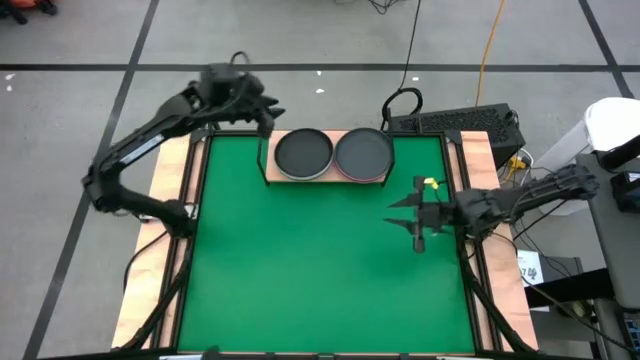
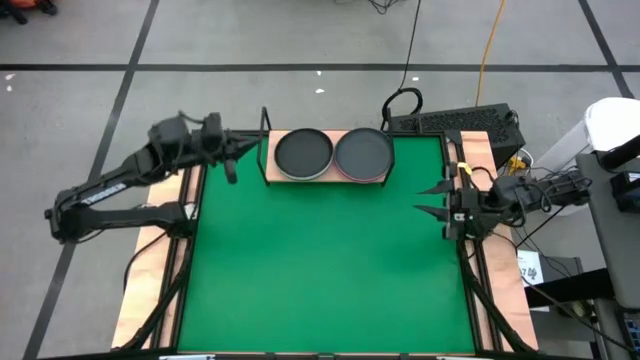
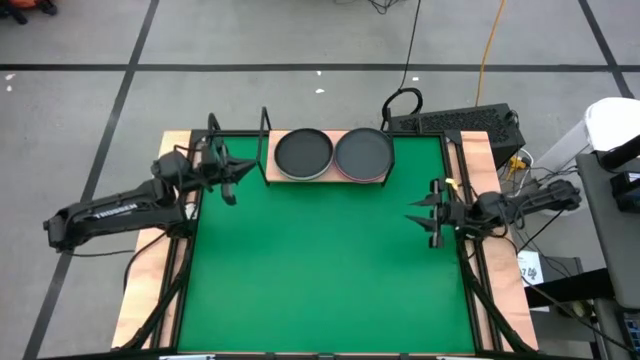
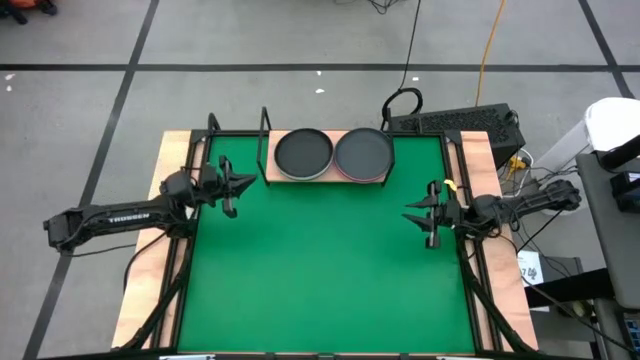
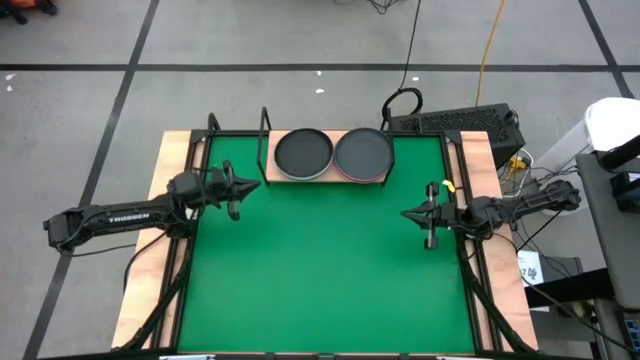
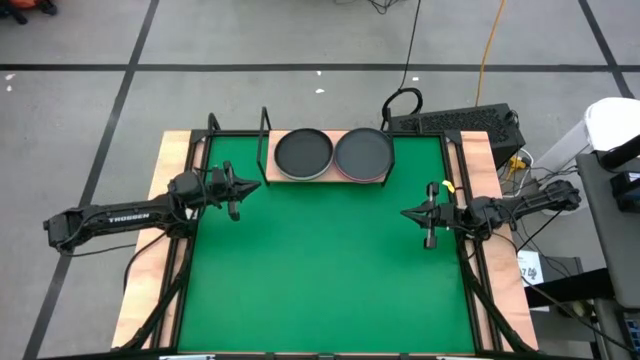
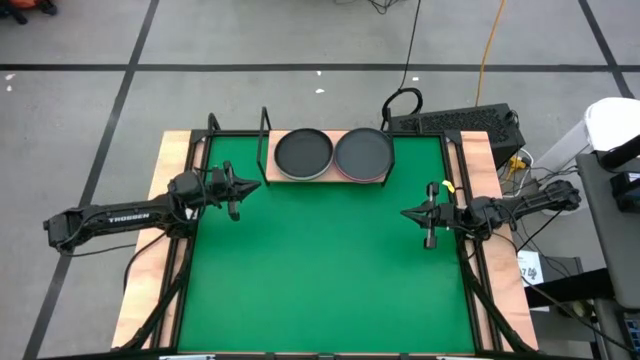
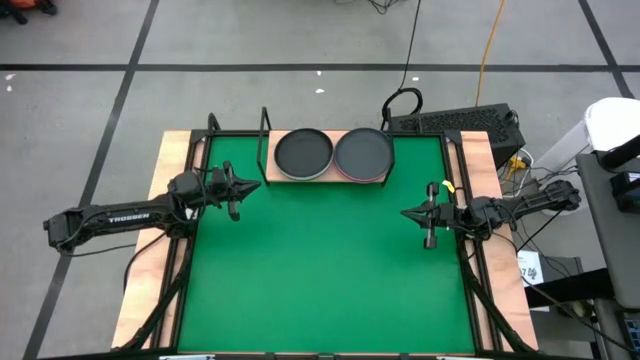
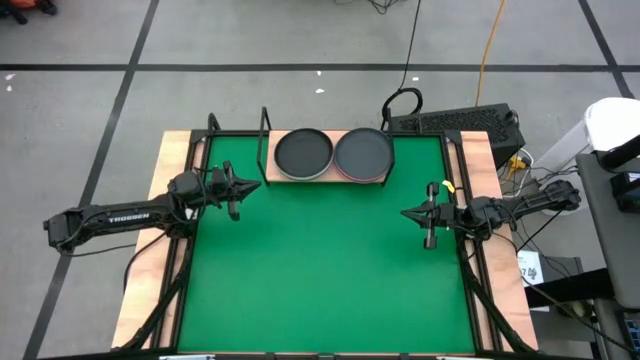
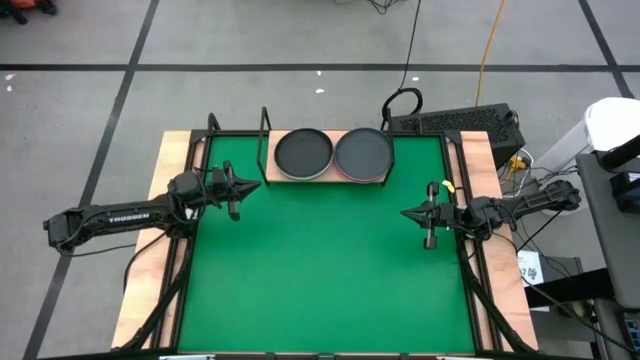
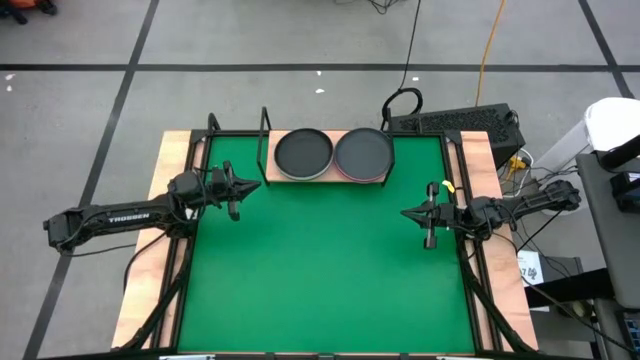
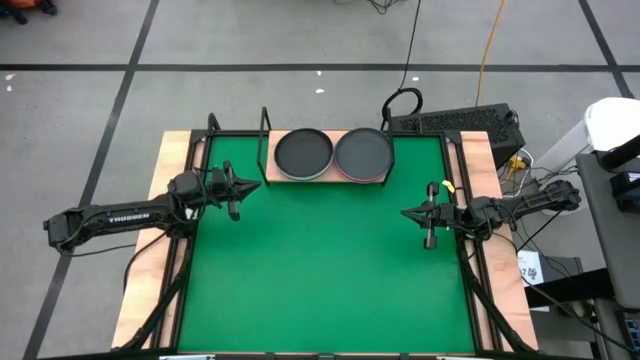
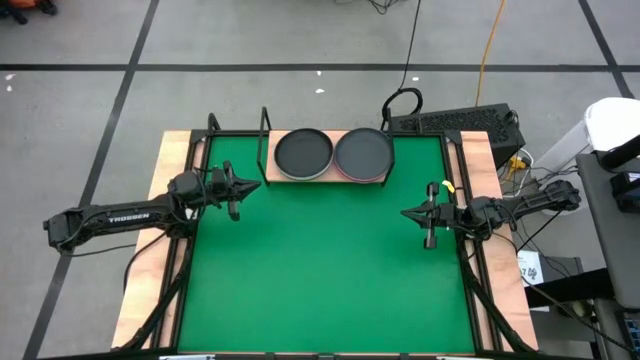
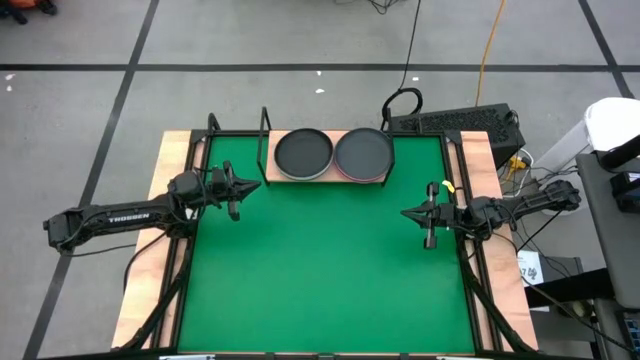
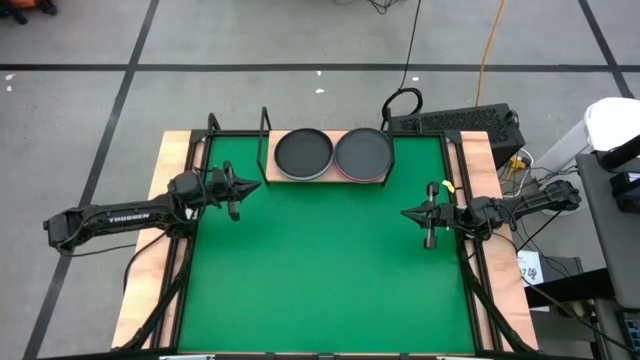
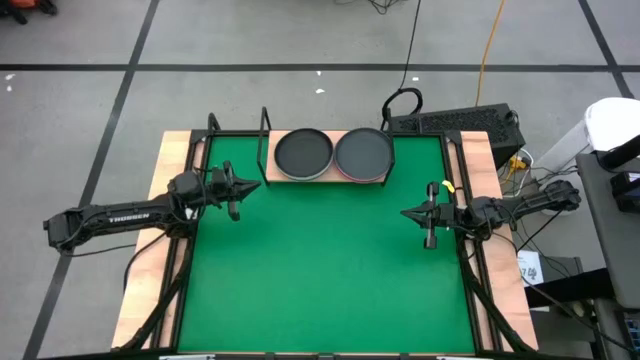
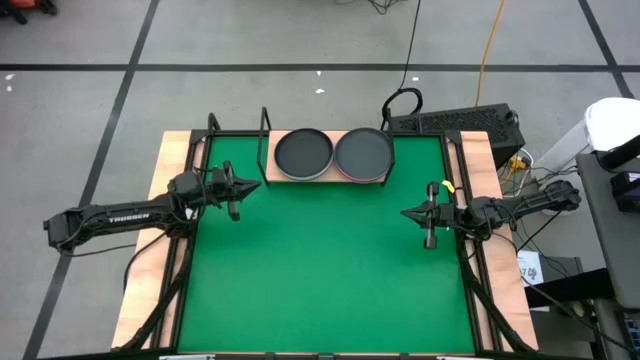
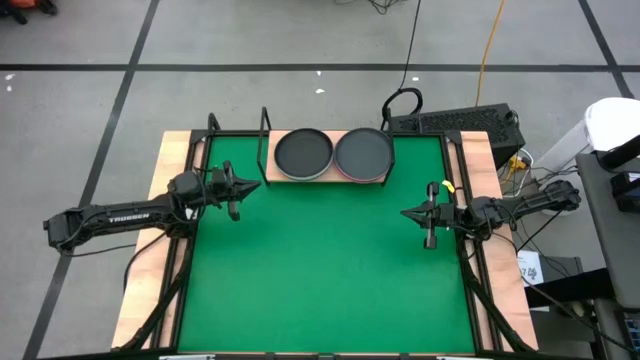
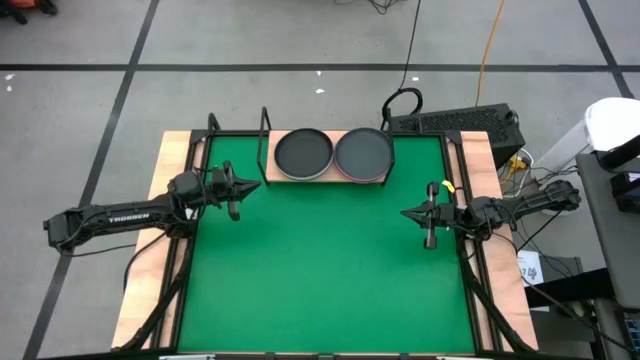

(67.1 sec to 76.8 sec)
Task: Place and stack plates onto a shelf
Return to Home Position

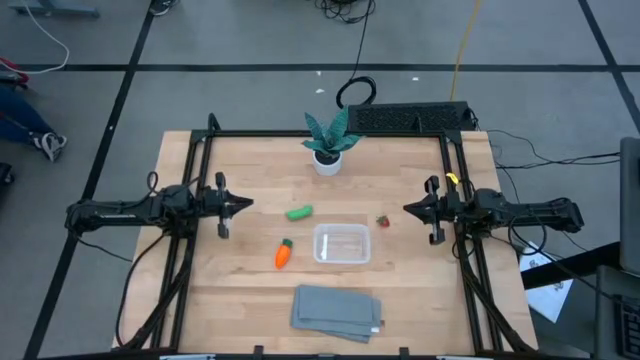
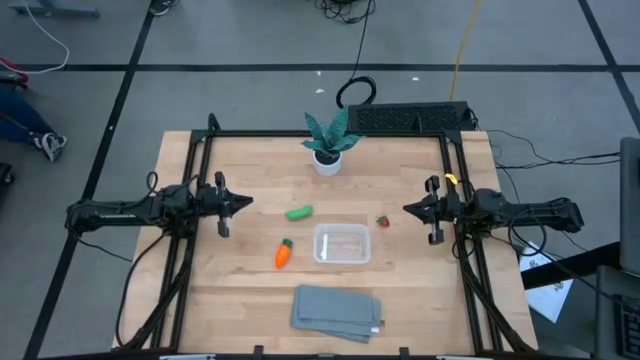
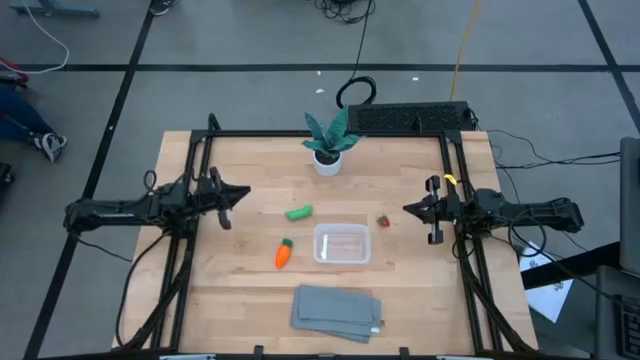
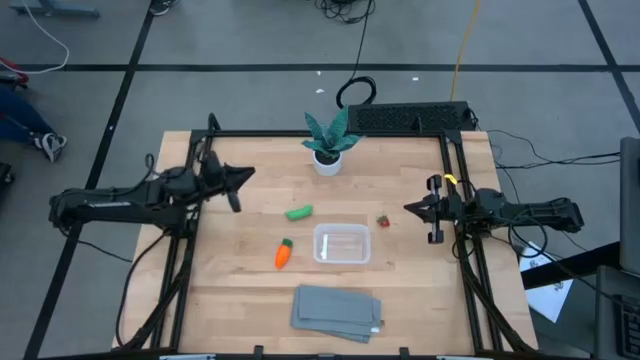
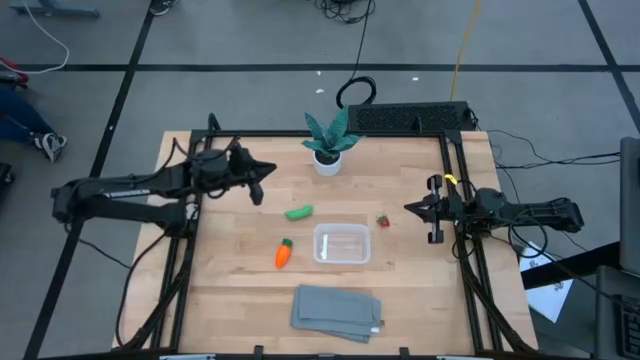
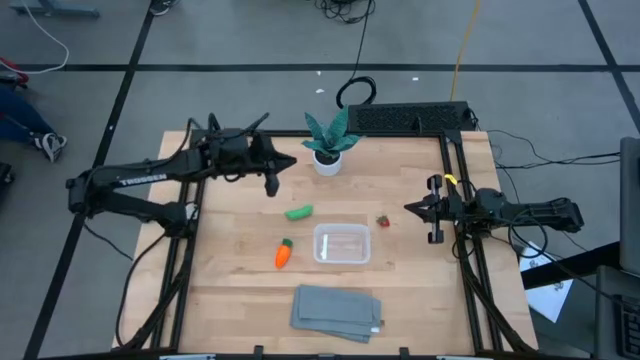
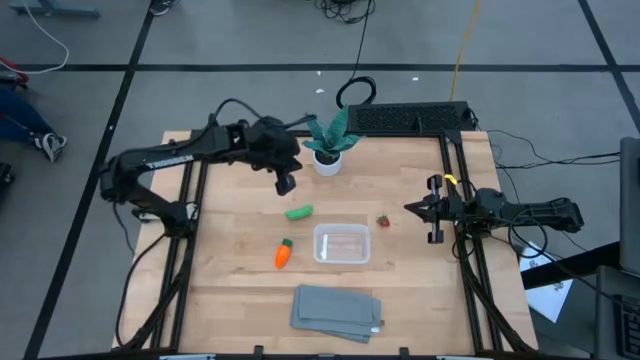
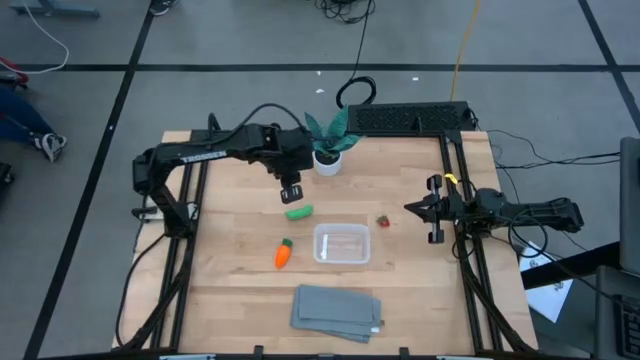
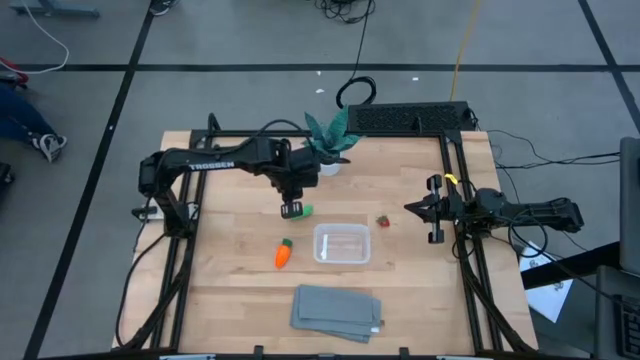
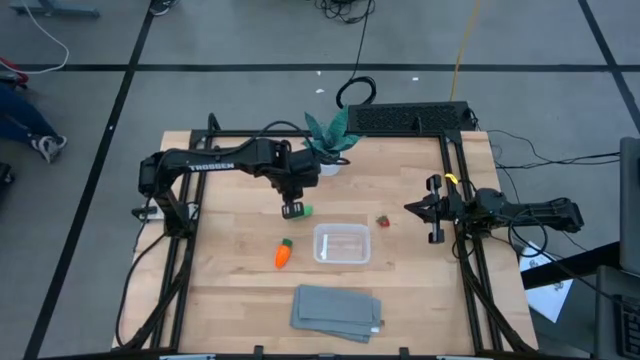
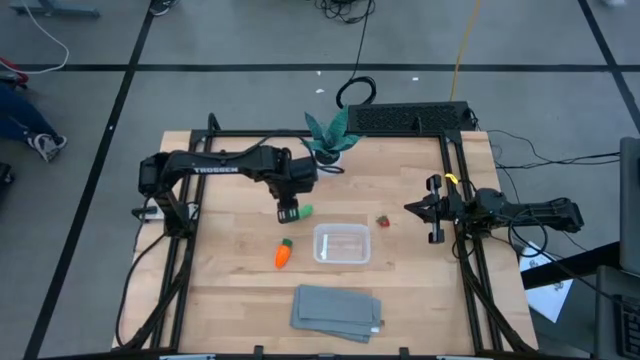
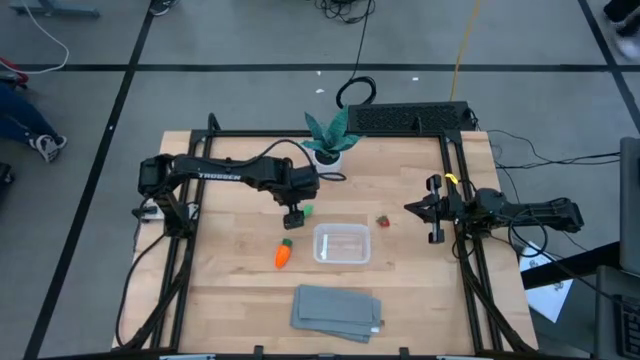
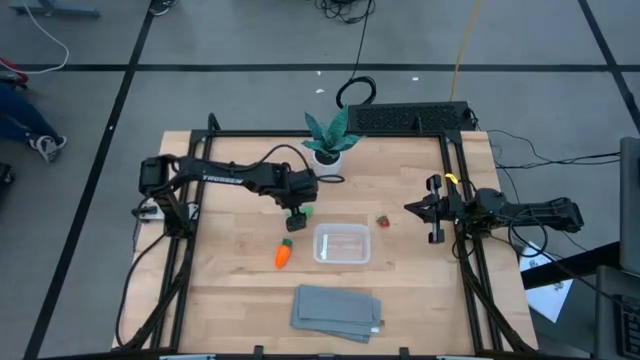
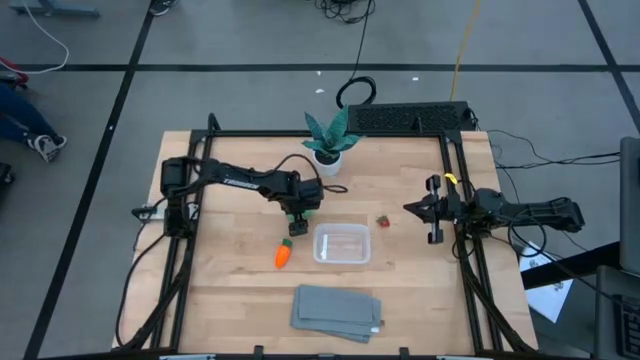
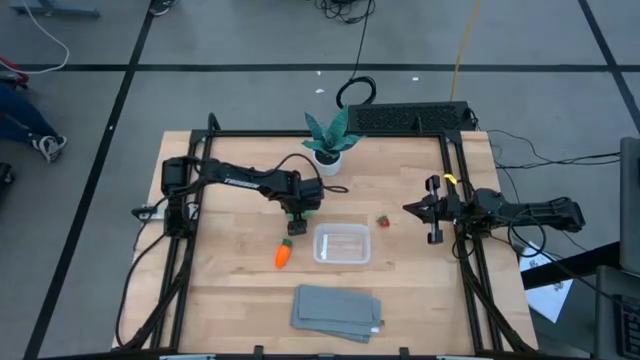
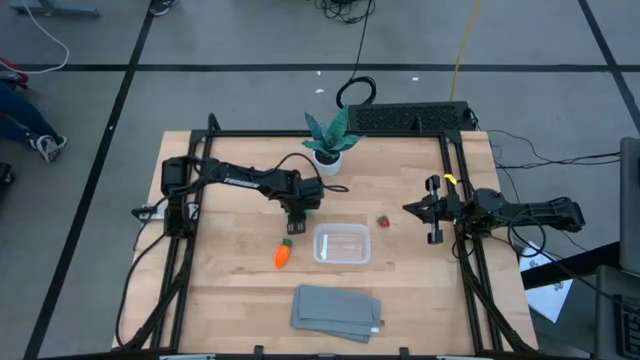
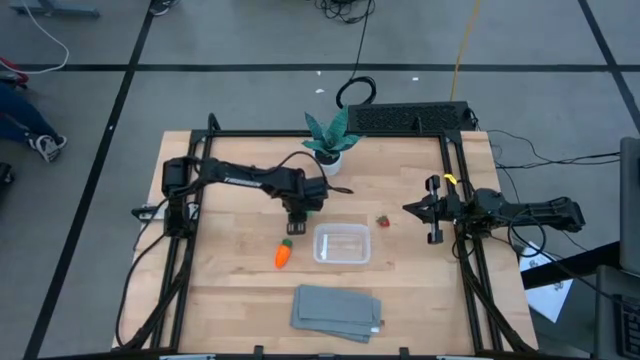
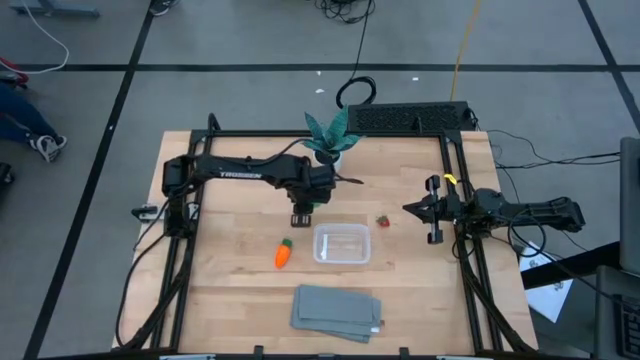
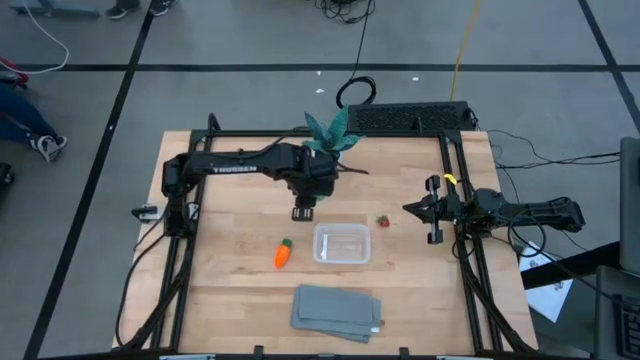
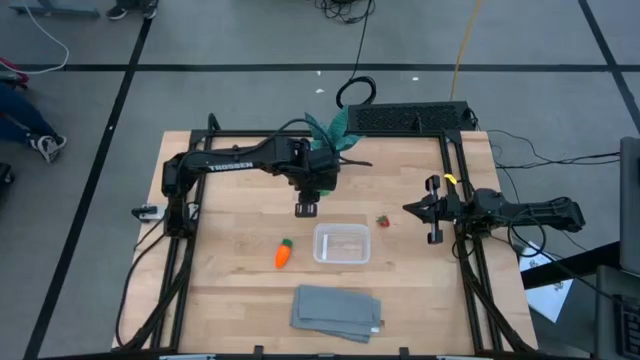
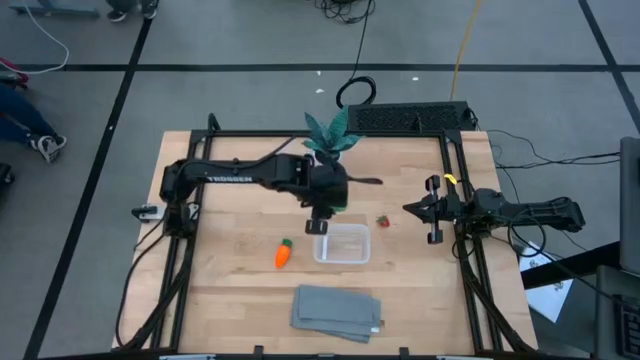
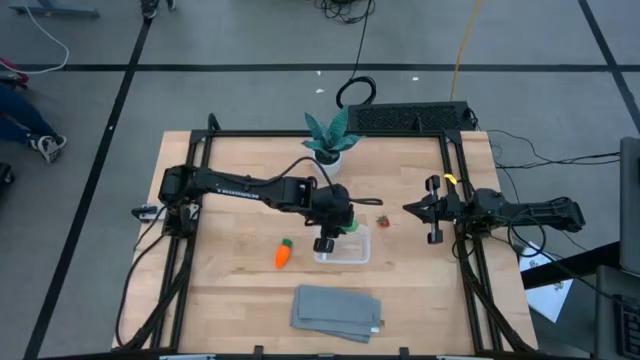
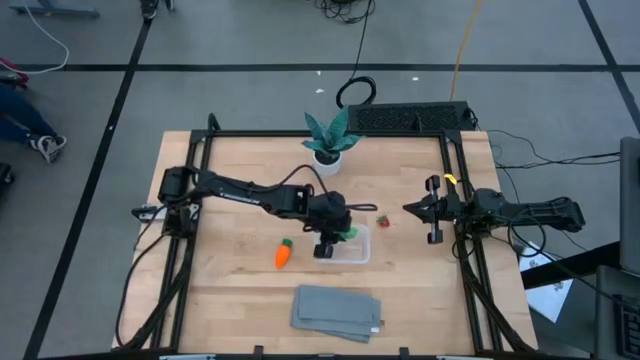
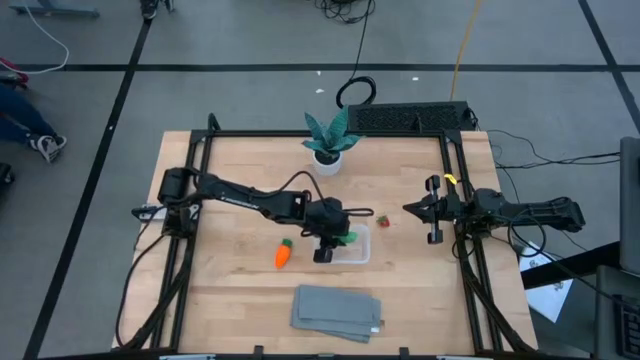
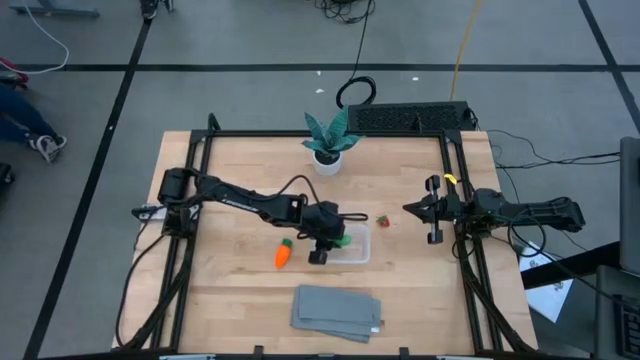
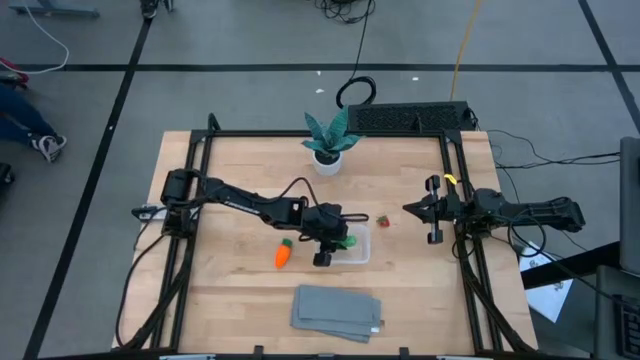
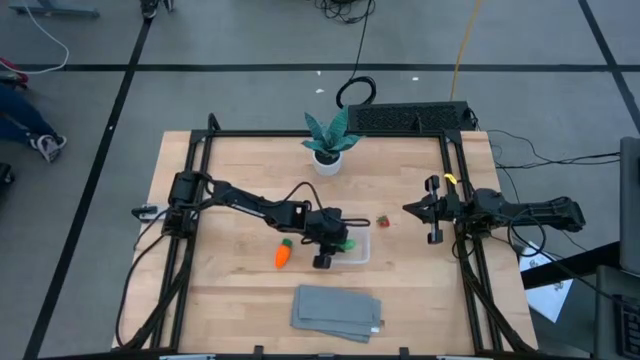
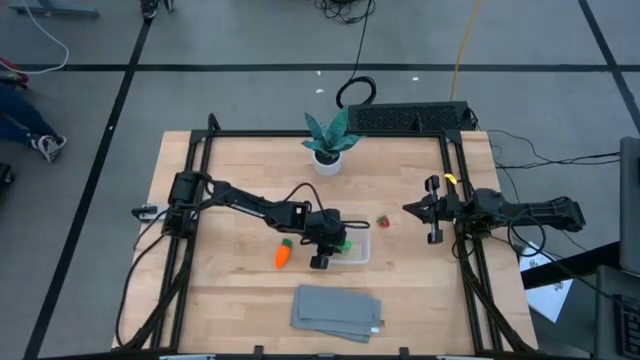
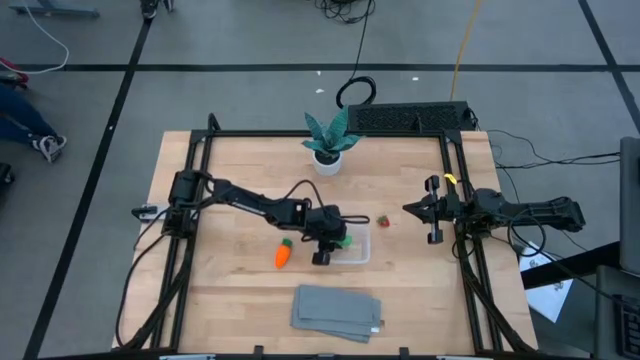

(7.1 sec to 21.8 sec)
Task: Pick and placing Produce into tupperware
Put the green pea into the transparent container
